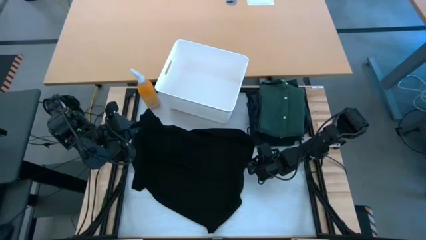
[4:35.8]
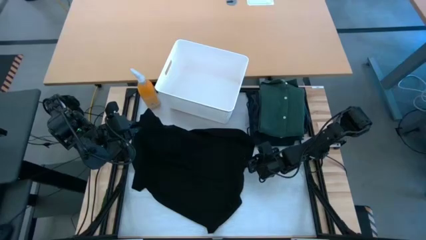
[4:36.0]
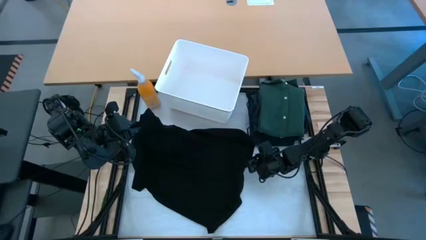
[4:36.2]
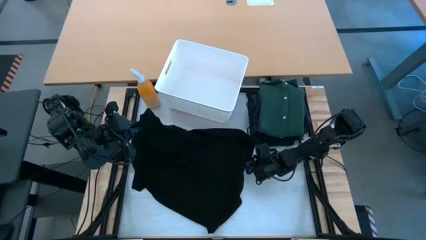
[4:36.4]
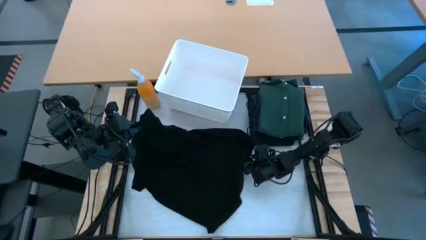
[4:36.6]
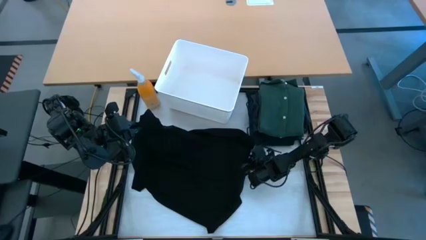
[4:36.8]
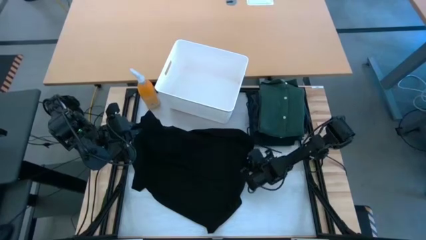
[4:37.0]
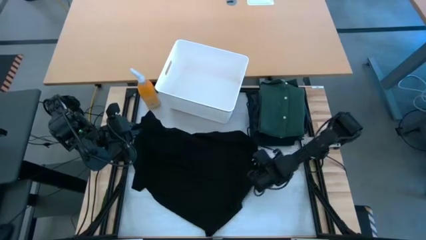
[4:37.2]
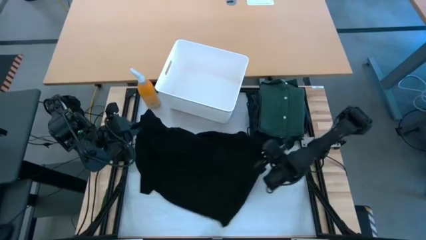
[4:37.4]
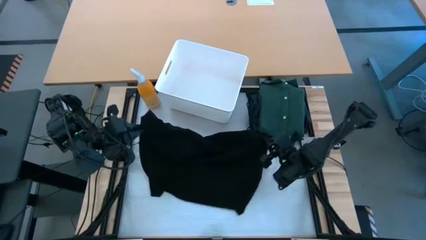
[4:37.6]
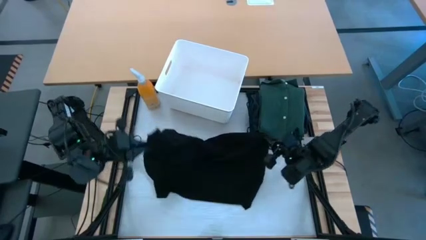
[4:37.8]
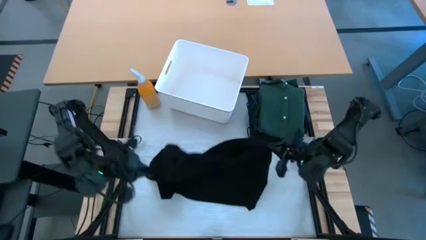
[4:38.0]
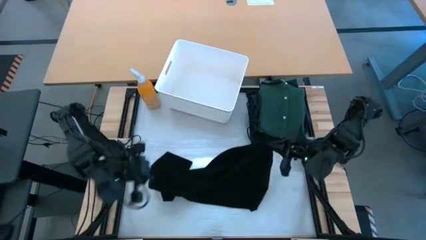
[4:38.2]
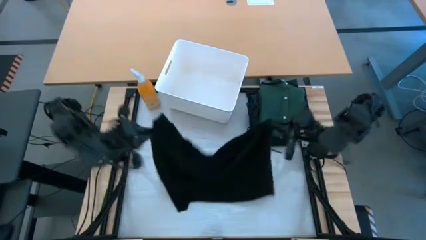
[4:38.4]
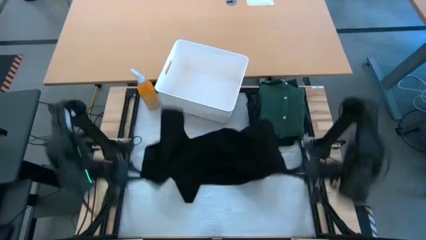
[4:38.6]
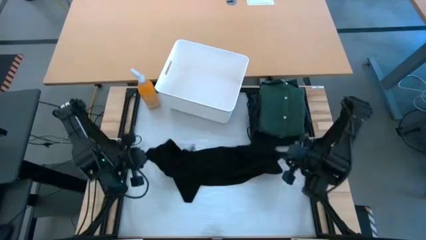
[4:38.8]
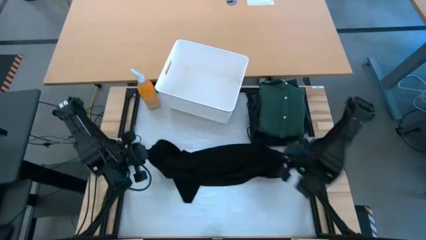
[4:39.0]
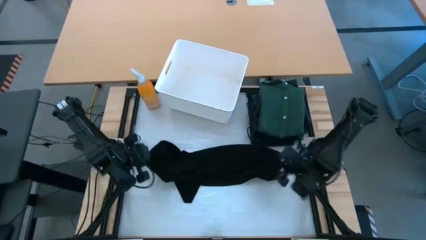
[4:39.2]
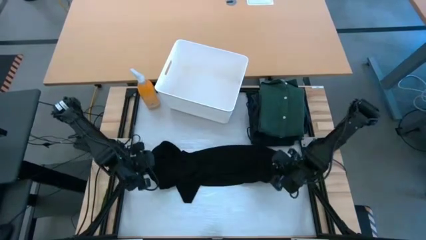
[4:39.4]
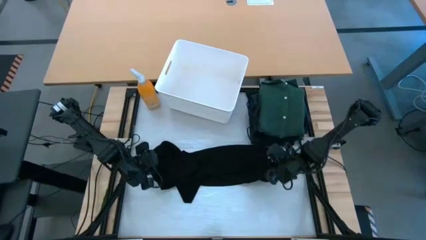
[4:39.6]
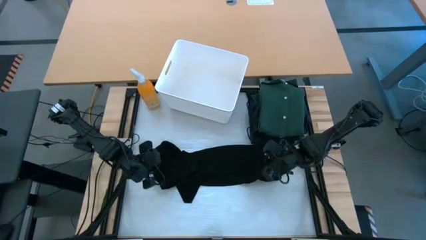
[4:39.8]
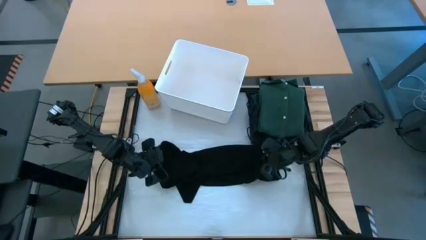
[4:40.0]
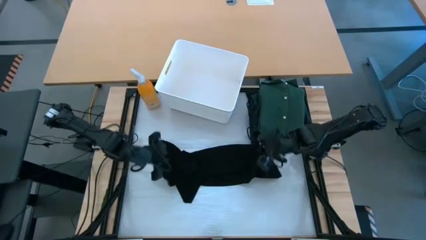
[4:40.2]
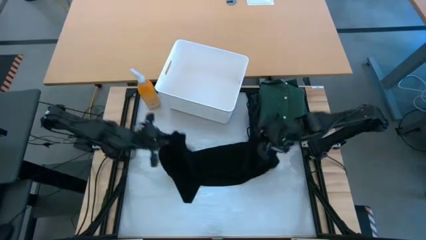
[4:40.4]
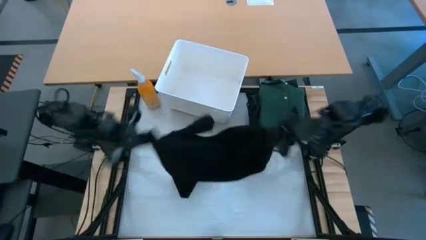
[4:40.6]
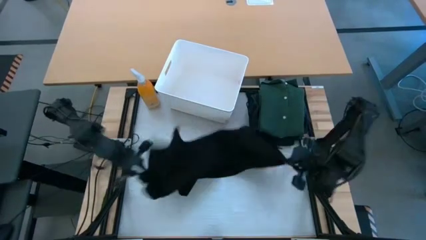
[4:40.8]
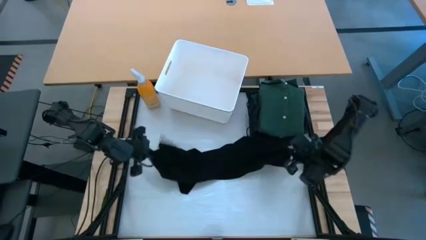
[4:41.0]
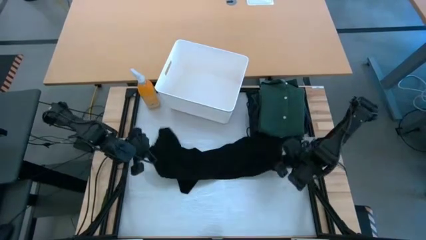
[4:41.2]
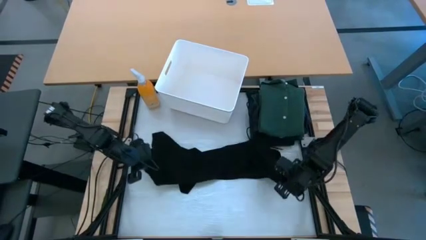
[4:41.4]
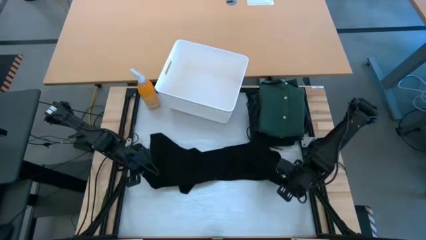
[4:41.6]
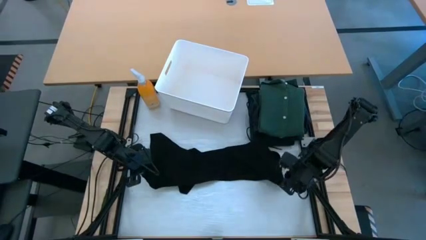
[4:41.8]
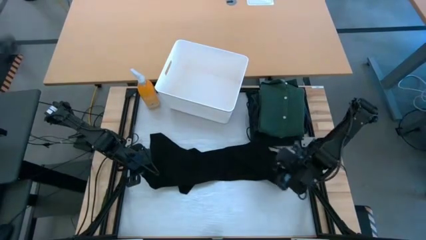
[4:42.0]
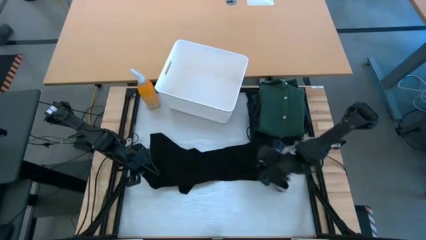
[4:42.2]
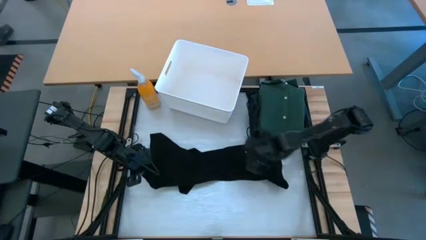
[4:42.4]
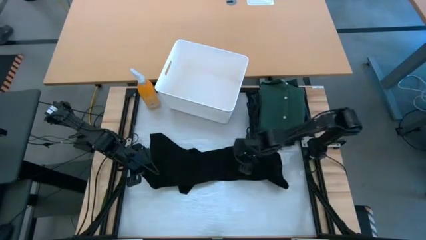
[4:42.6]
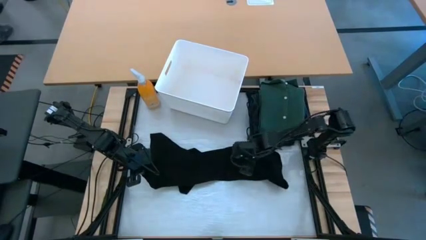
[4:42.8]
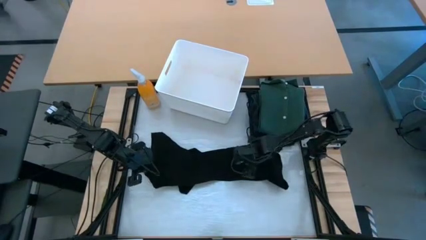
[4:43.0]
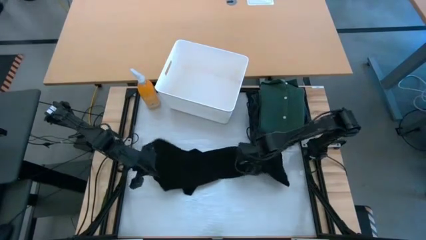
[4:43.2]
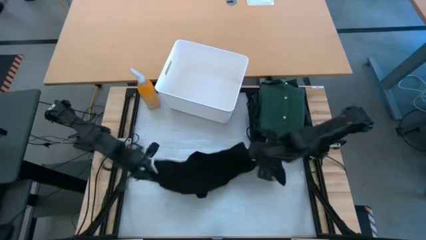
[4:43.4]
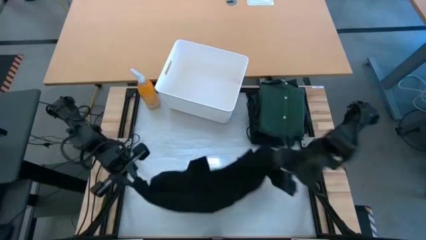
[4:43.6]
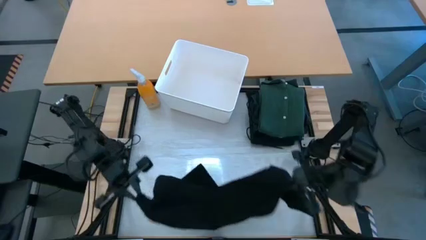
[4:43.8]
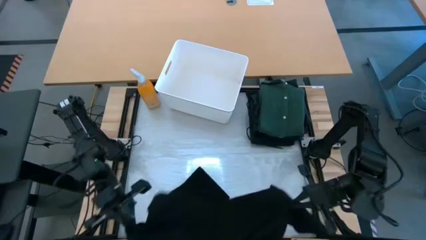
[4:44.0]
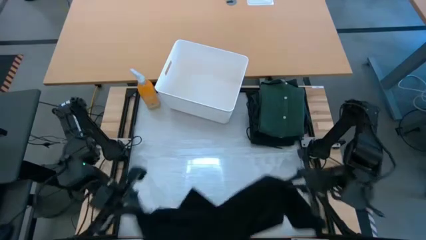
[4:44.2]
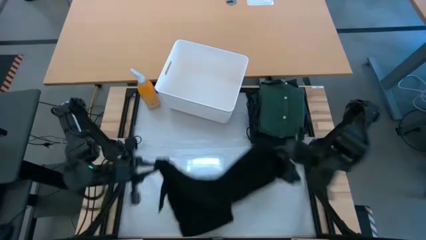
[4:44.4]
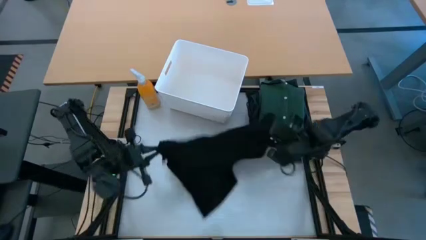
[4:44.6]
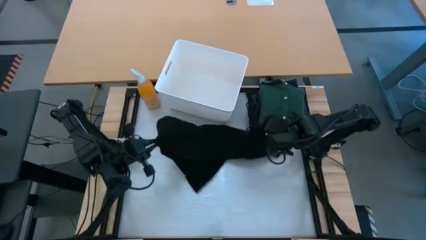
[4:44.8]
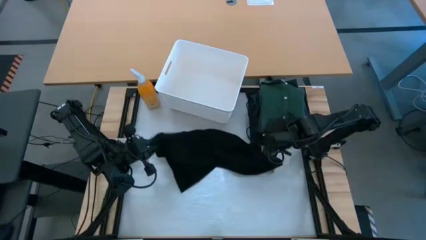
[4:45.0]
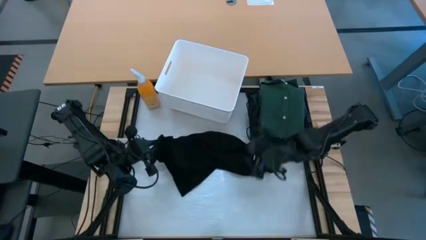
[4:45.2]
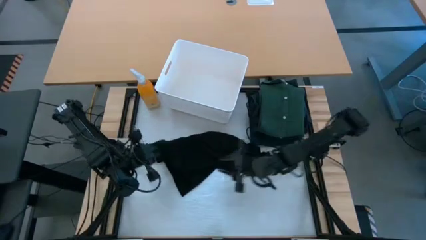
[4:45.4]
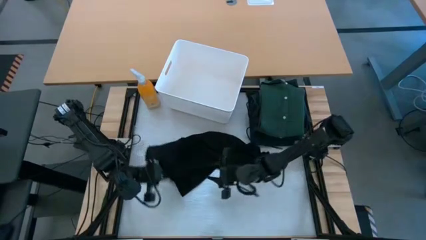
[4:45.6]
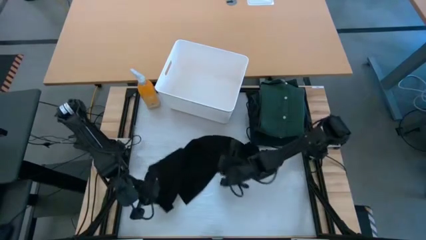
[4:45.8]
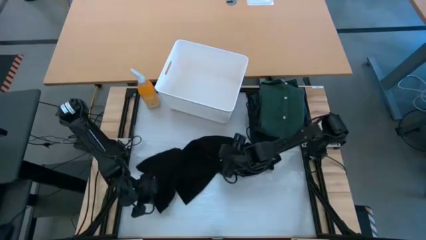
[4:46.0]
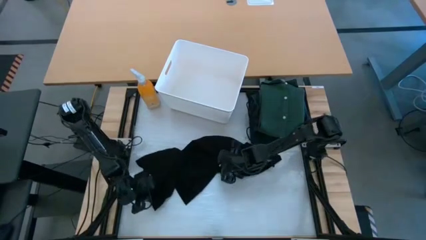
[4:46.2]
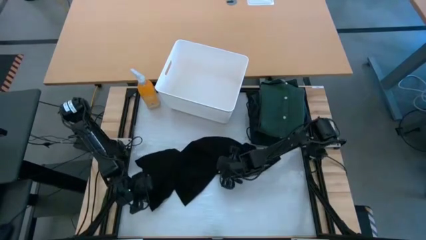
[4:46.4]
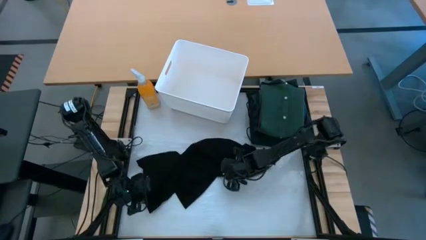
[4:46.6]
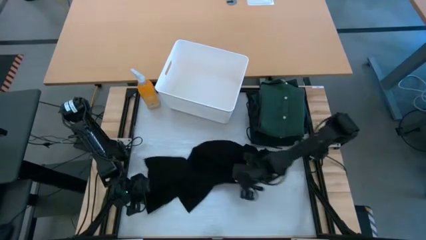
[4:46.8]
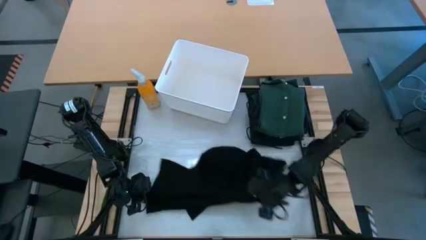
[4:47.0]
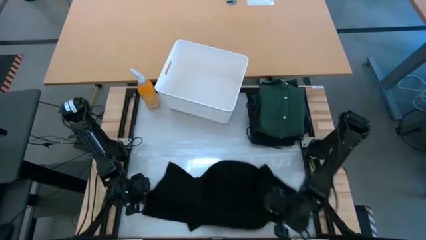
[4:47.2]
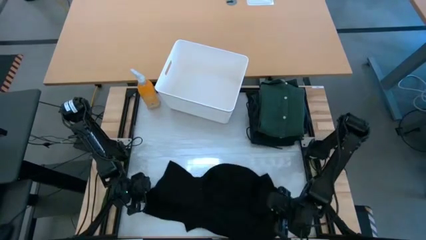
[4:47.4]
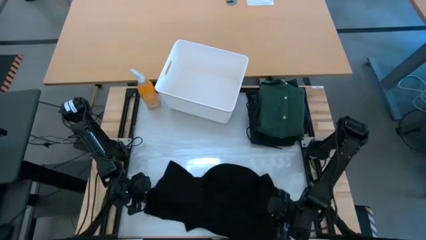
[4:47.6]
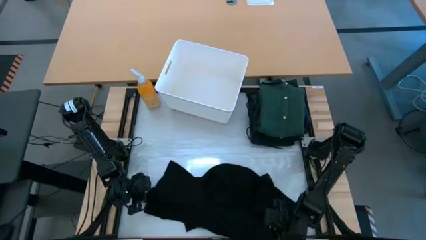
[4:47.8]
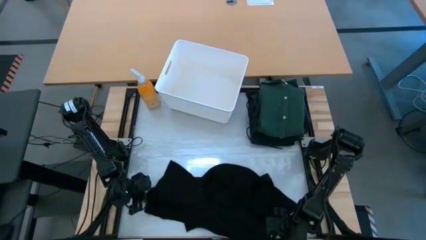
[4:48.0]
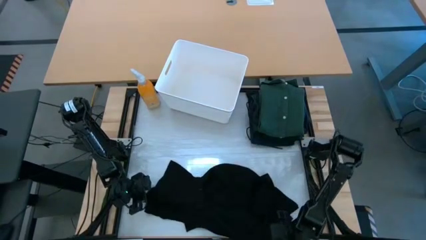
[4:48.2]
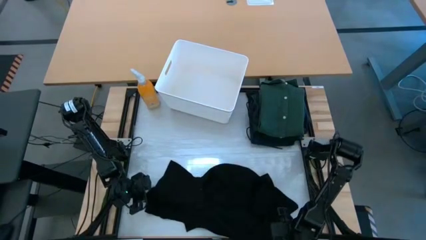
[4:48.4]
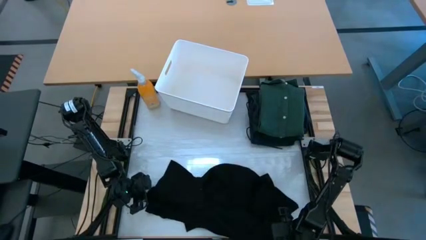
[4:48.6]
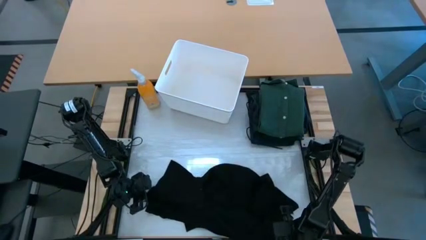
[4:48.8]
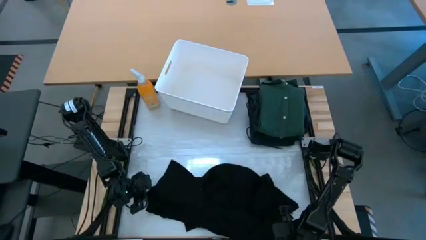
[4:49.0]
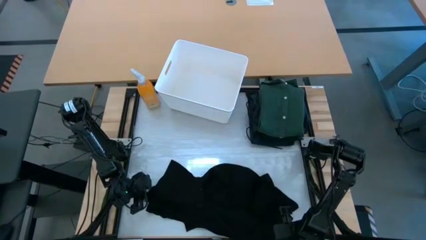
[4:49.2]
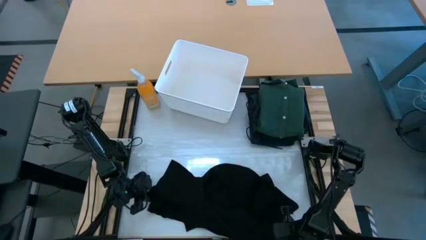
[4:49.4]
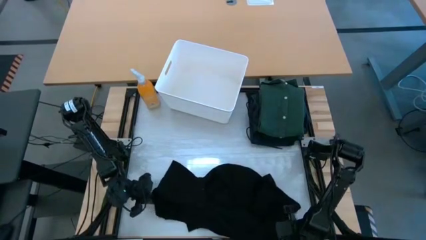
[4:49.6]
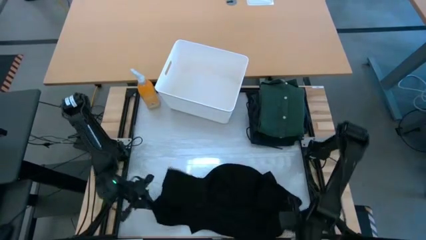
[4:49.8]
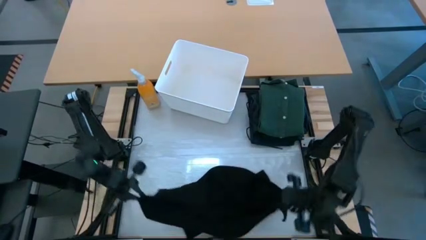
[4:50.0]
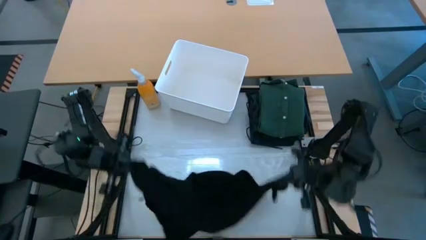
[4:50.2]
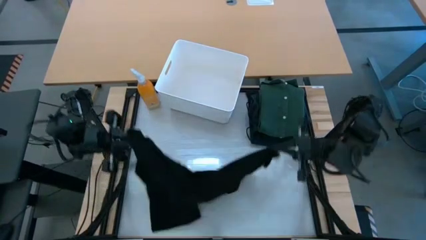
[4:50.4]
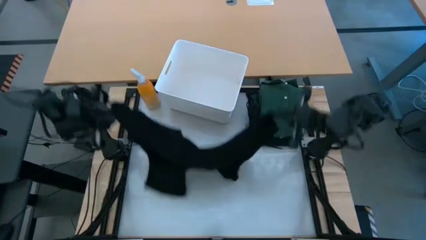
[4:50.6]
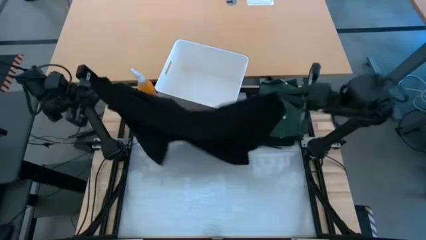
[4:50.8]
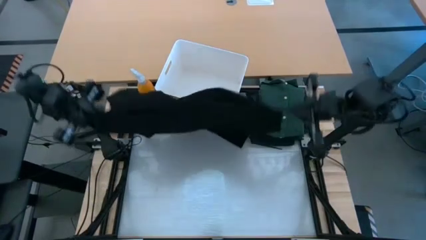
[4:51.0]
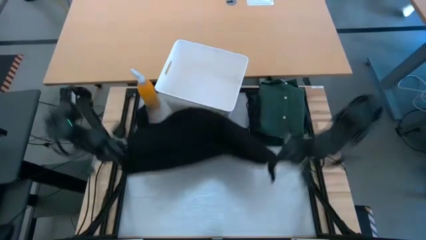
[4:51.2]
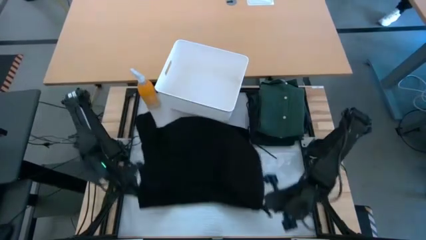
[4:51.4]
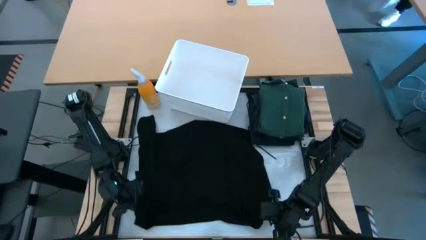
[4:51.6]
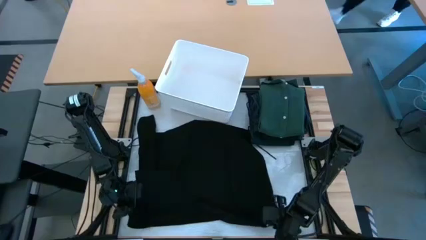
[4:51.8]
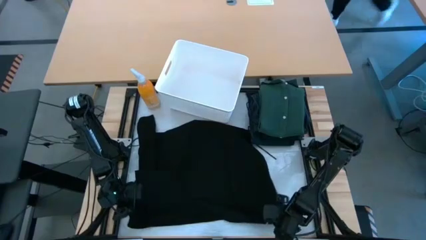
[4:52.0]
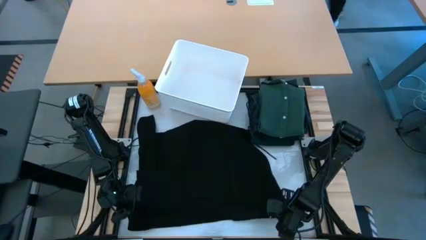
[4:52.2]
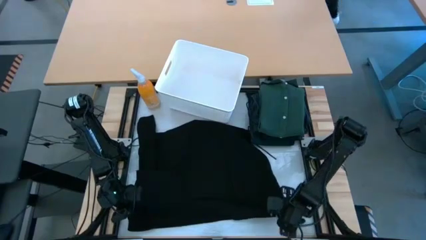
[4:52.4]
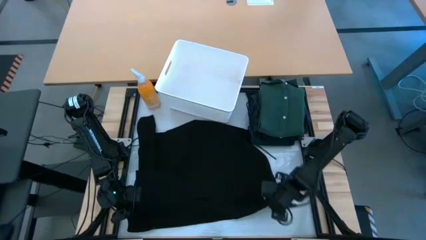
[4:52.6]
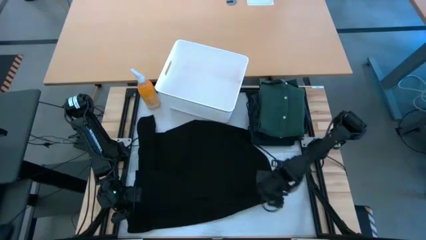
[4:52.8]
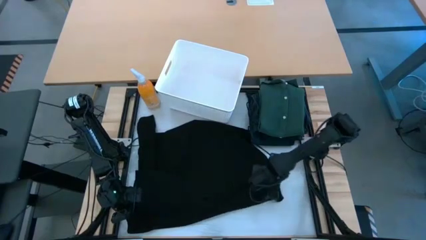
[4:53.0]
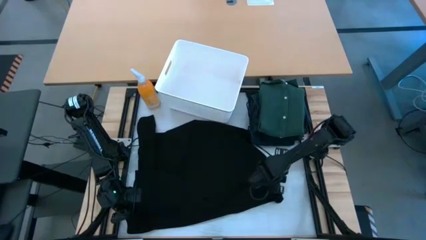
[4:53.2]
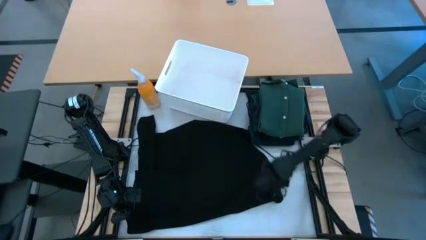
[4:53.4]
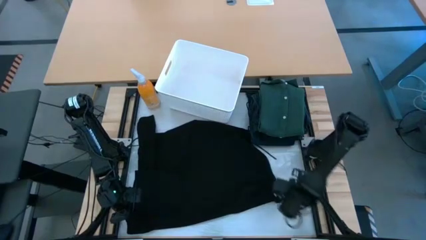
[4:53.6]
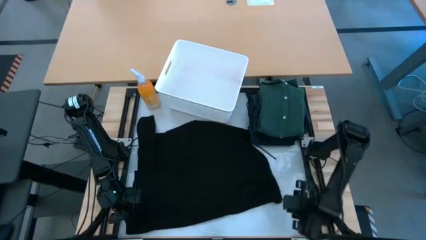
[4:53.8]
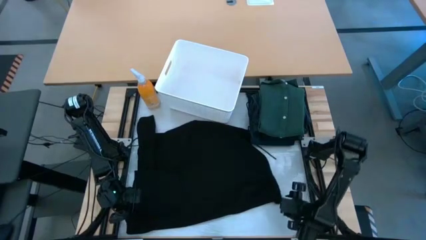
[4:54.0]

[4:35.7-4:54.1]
Task: Fold laundry
Fold the black shirt
